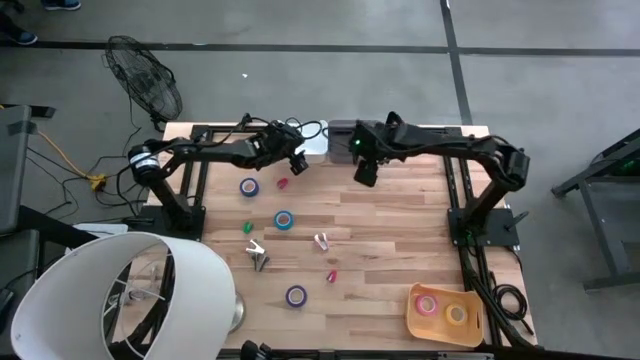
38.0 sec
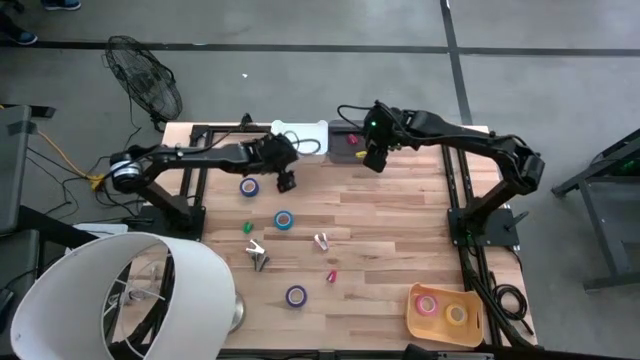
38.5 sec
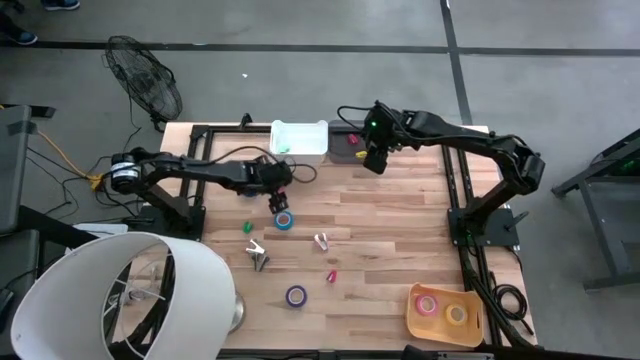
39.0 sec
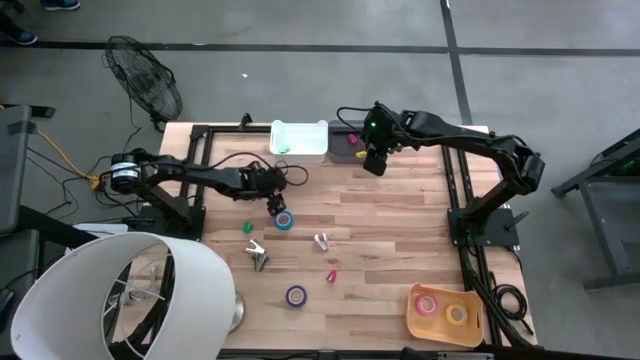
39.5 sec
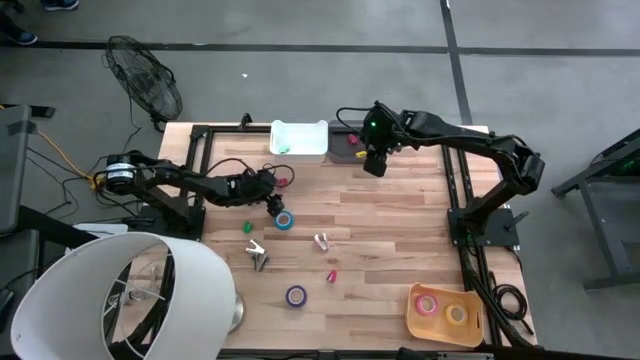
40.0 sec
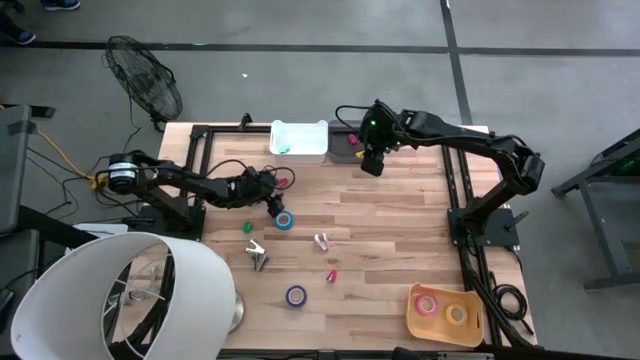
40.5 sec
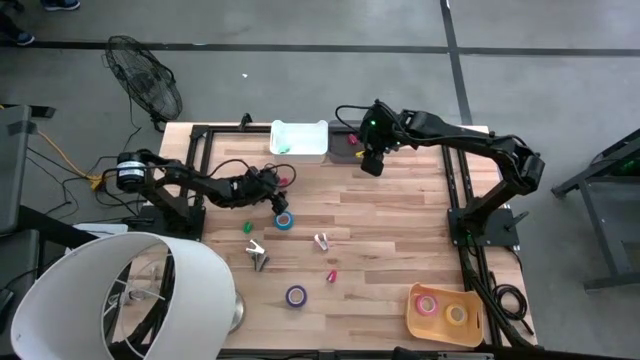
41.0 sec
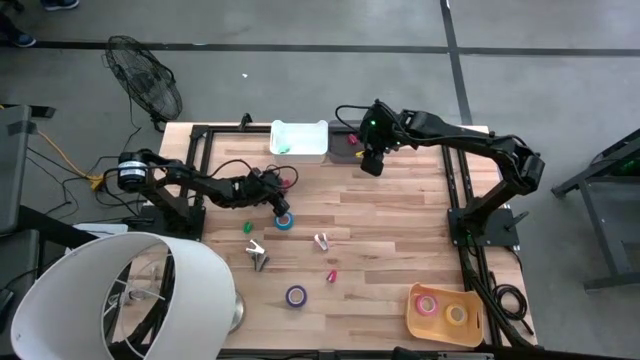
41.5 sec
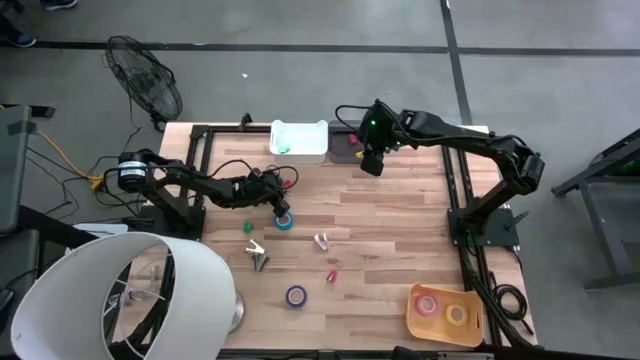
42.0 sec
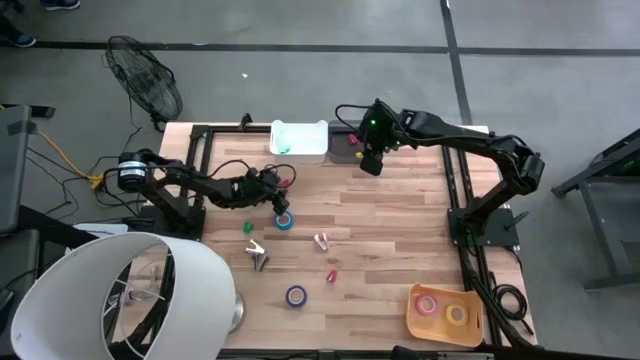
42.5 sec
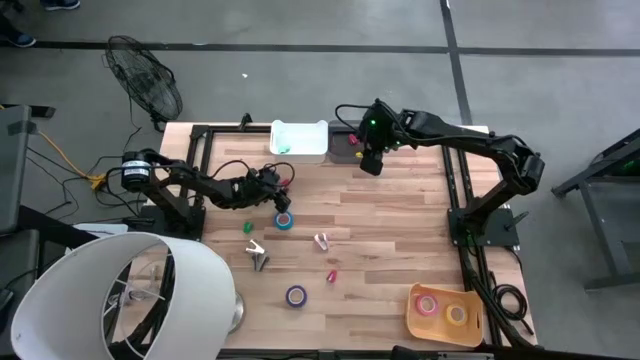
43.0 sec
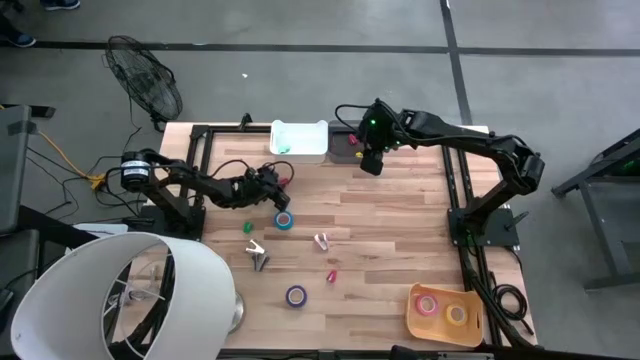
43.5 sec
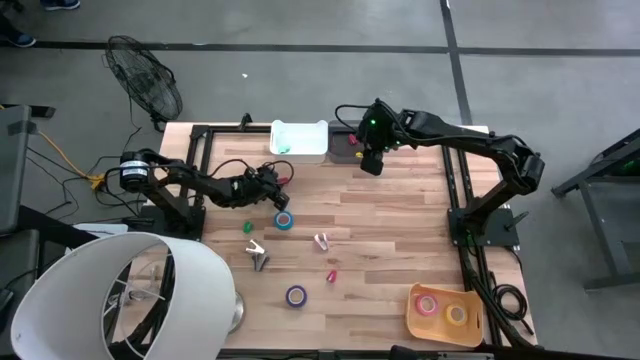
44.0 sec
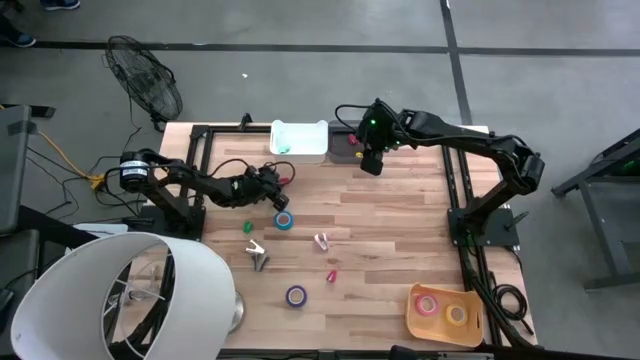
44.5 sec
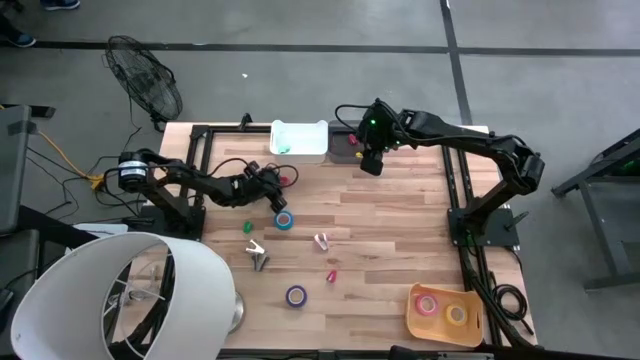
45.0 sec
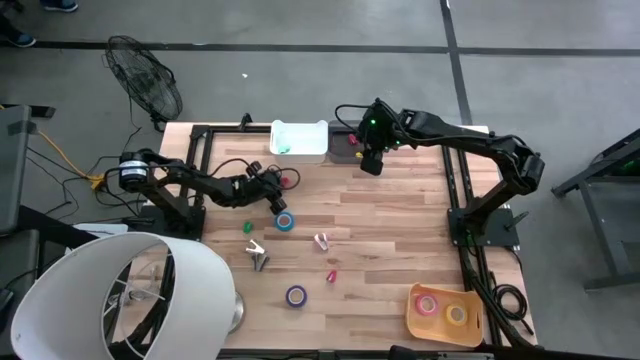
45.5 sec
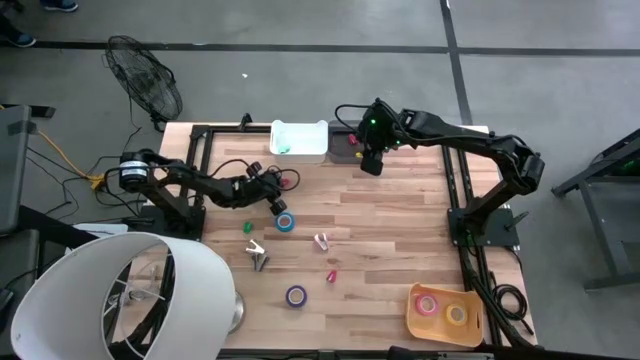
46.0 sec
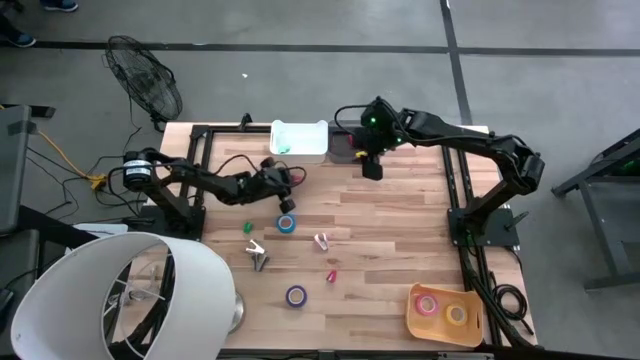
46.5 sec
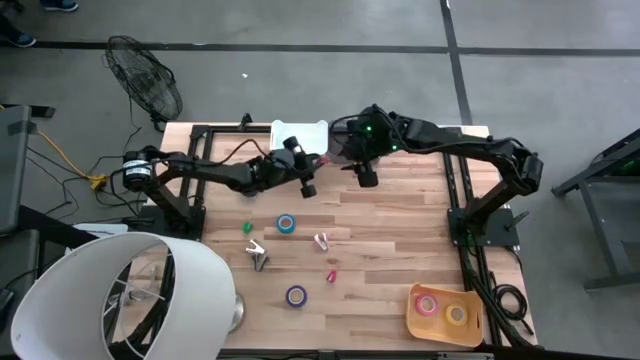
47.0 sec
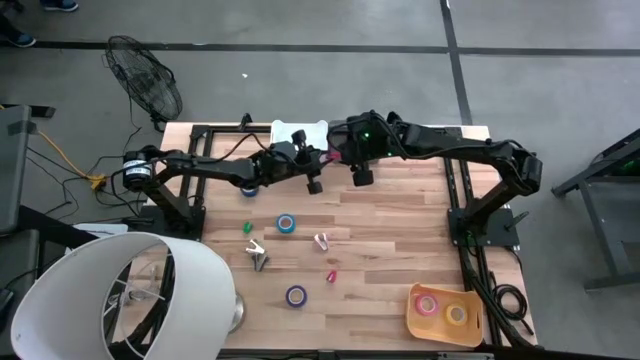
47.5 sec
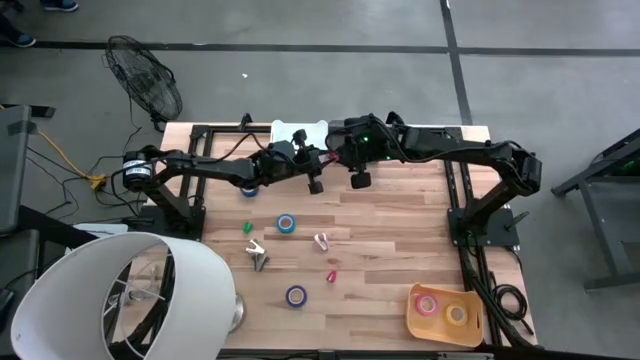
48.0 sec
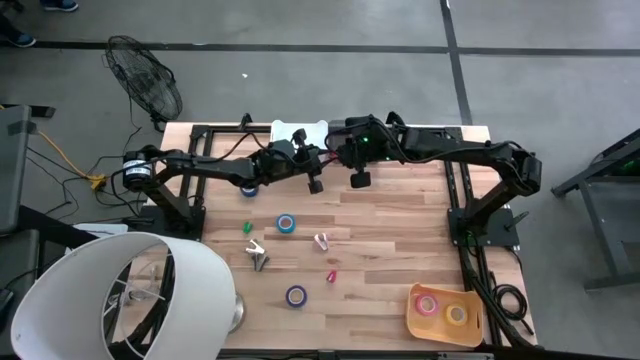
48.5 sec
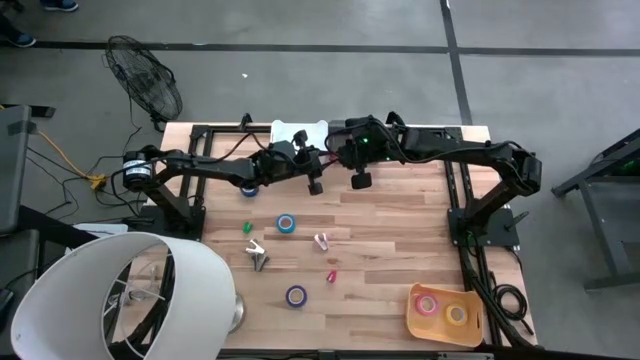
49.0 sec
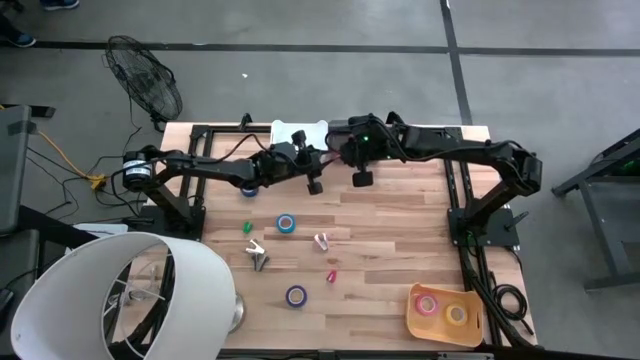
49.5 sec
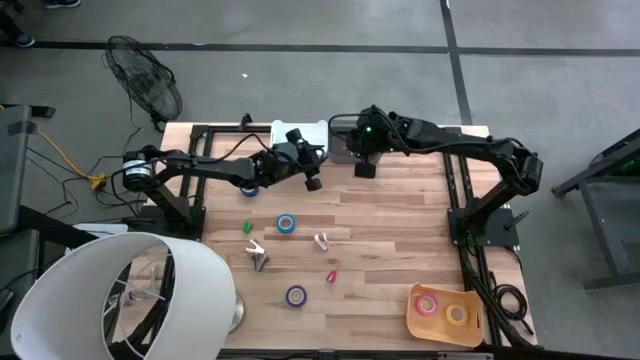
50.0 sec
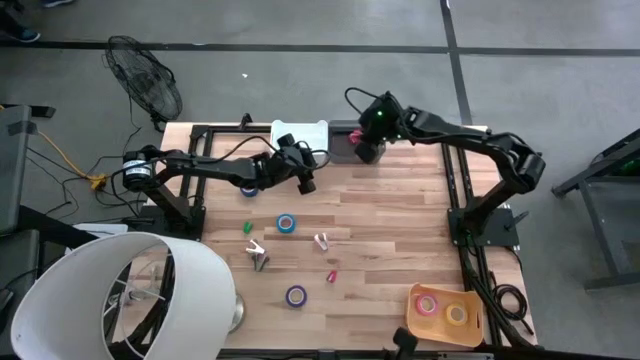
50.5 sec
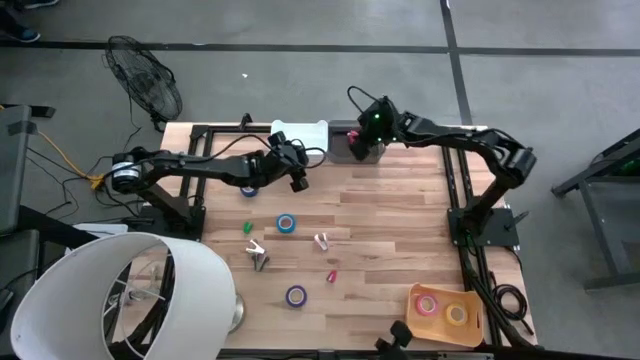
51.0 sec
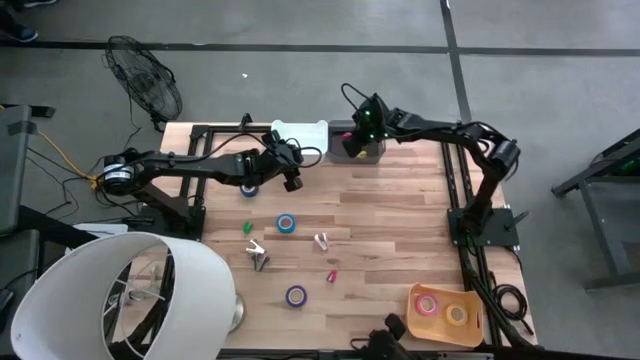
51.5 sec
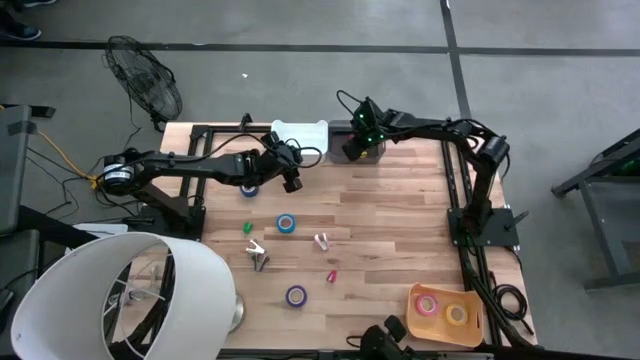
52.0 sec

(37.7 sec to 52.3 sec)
Task: Pick and place Stapler, Stapler remover, tape
Put the top red stapler into the black bin

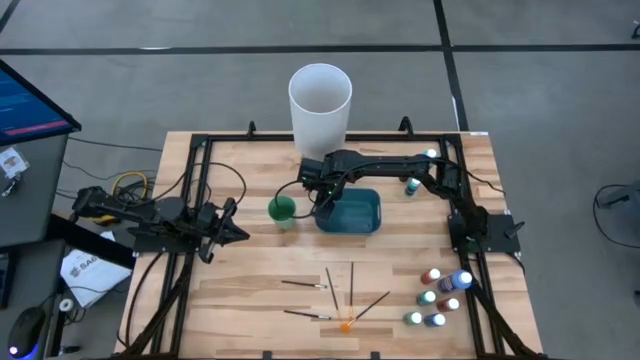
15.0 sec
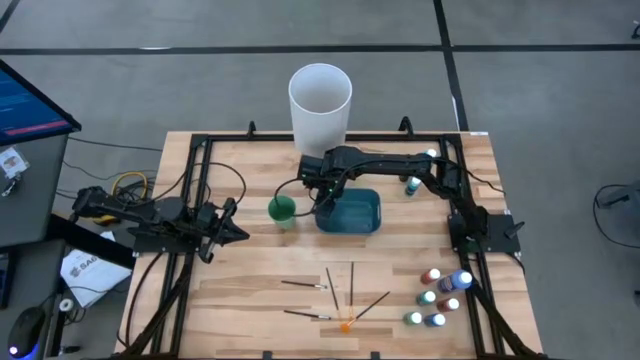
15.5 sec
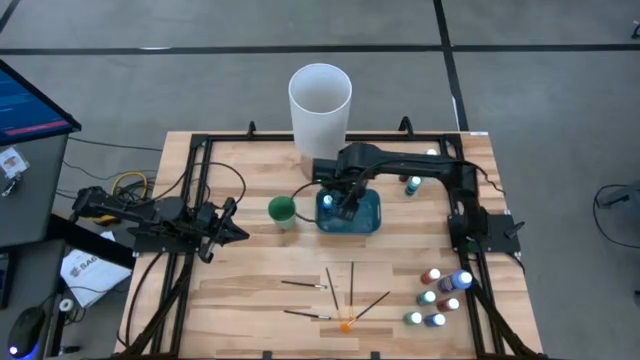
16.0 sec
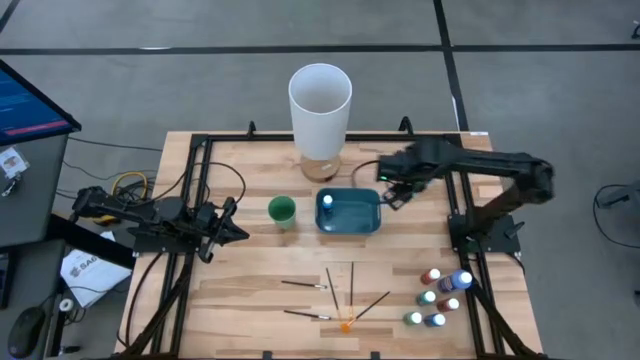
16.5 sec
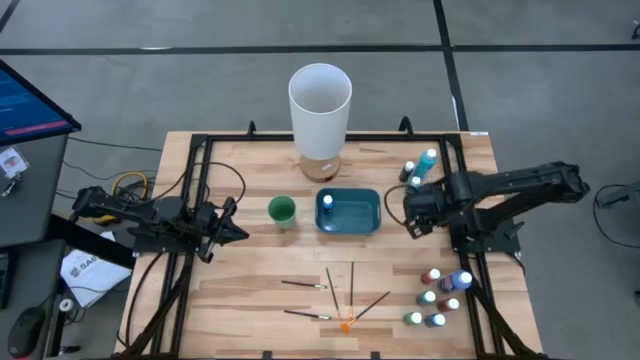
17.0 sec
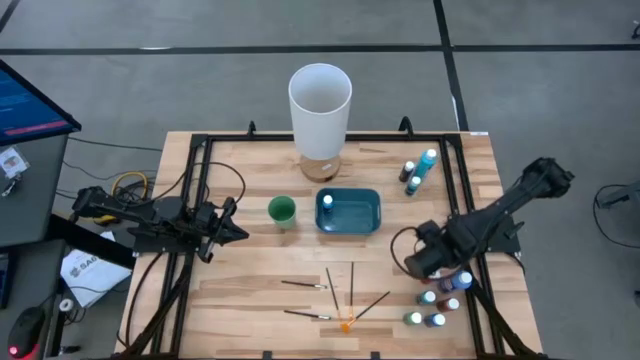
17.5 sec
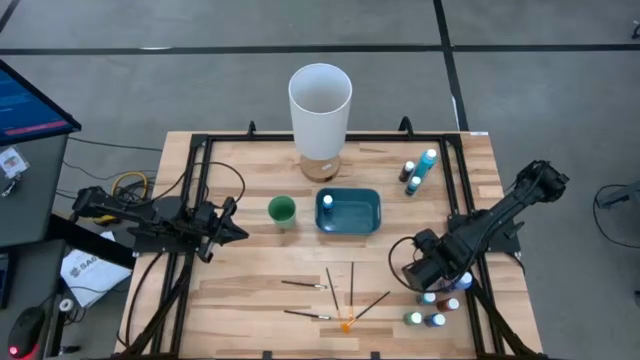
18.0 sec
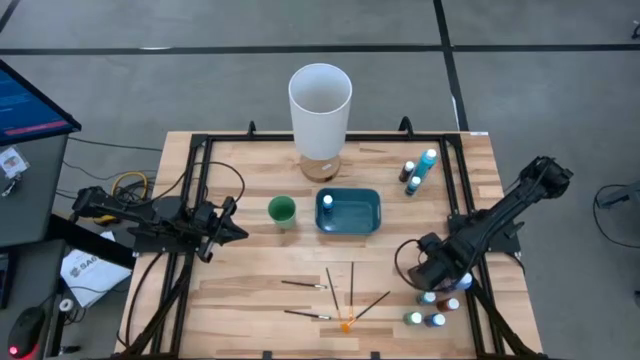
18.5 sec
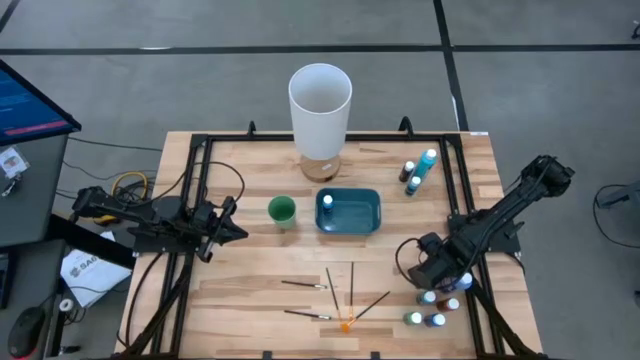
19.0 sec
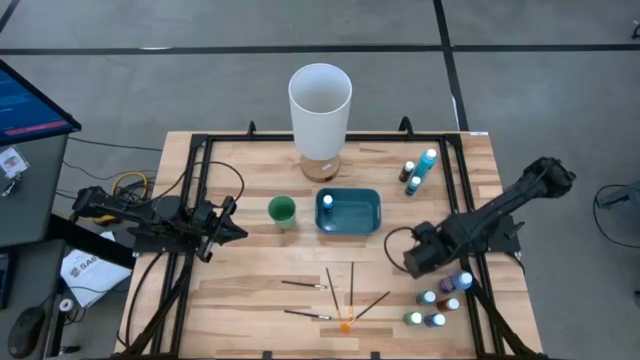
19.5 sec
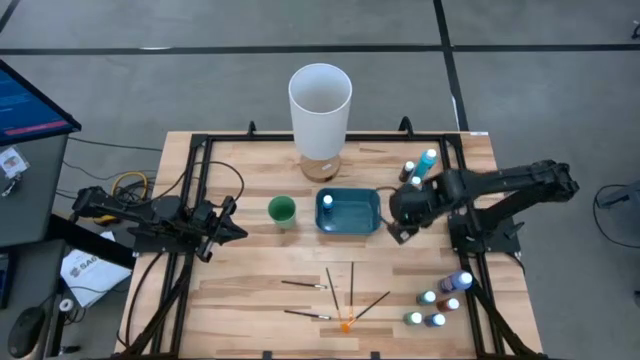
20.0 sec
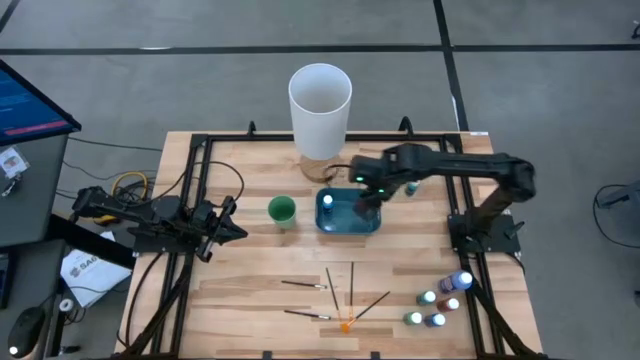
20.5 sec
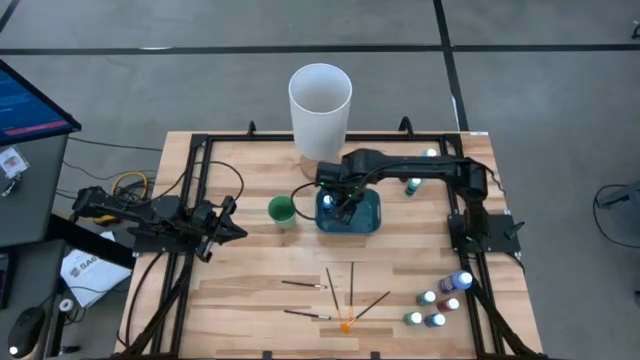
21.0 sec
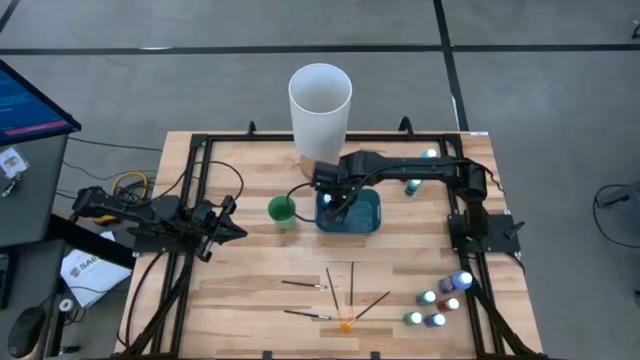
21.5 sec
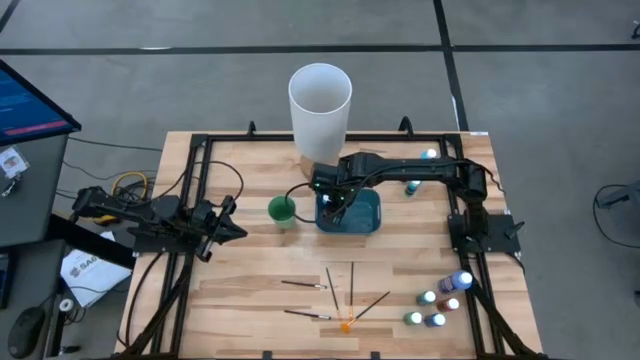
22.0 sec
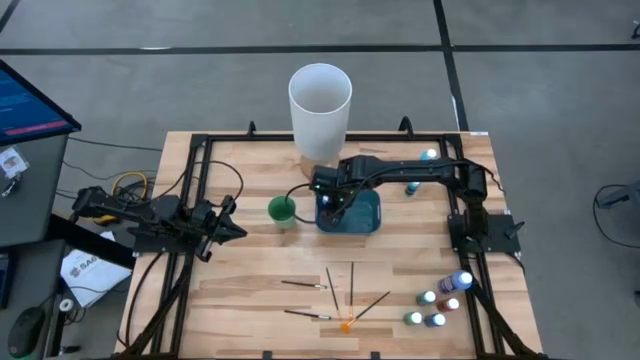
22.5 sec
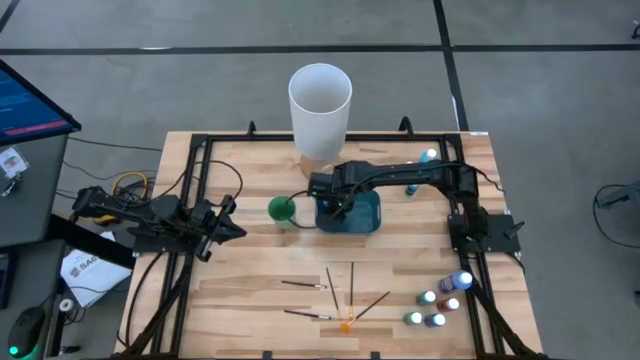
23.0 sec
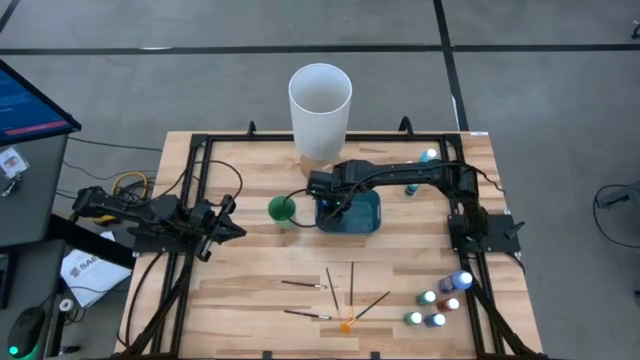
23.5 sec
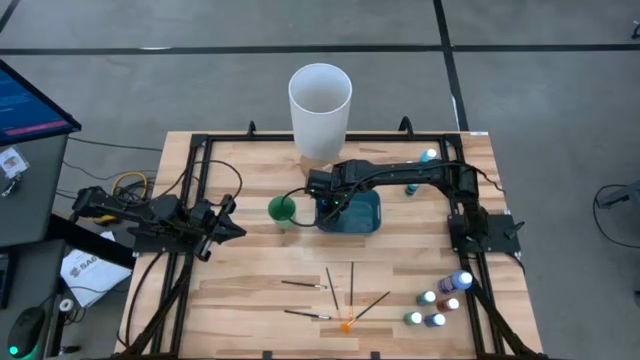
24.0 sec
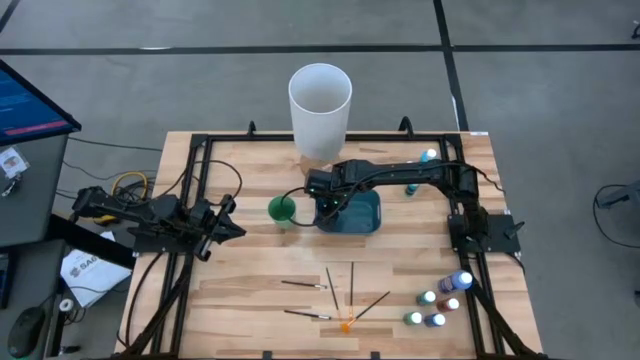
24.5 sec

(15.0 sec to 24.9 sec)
Task: Pick & Place Paint Supplies
Put the left small red paint bottle into the green bin
